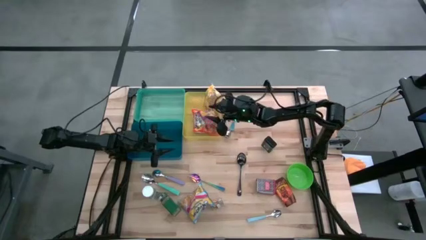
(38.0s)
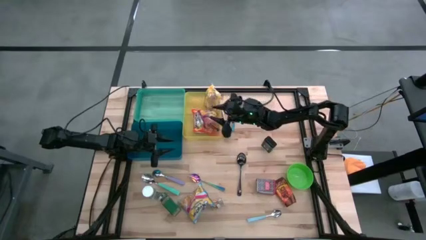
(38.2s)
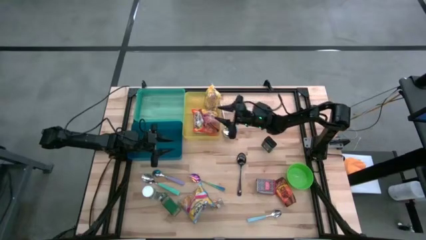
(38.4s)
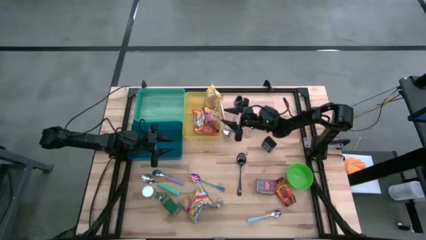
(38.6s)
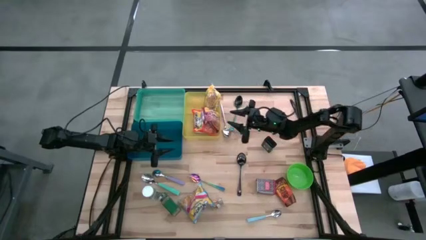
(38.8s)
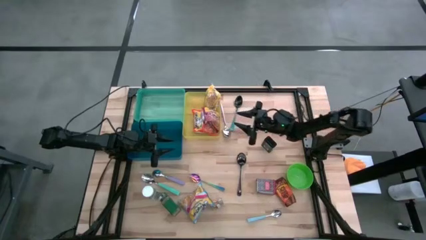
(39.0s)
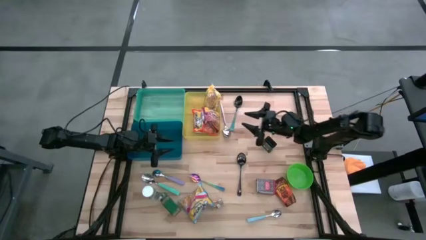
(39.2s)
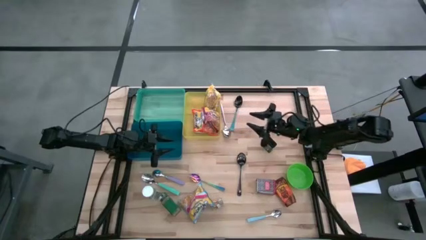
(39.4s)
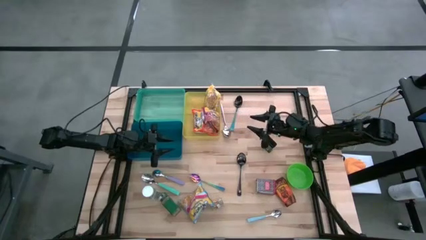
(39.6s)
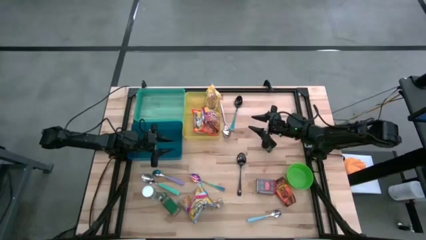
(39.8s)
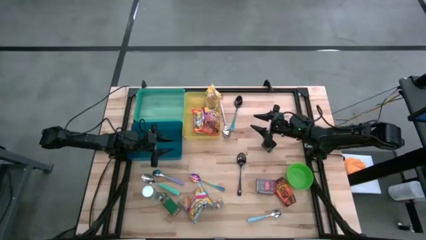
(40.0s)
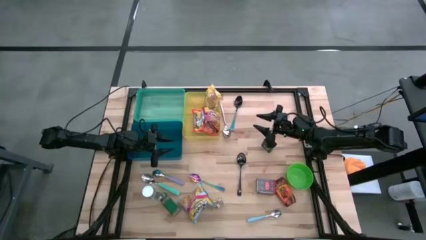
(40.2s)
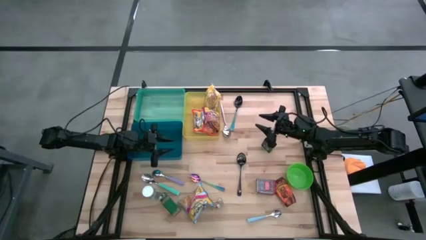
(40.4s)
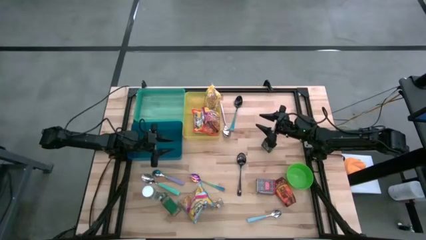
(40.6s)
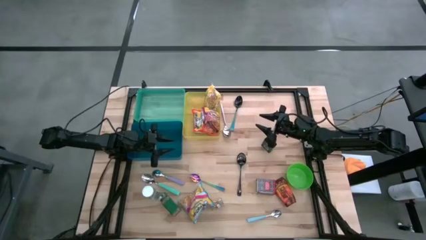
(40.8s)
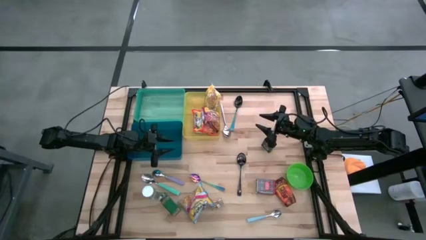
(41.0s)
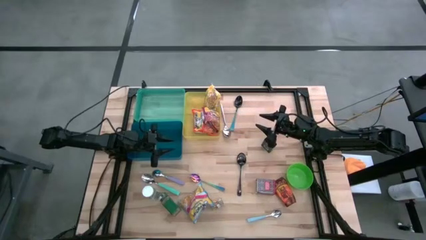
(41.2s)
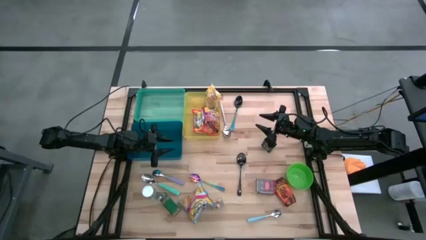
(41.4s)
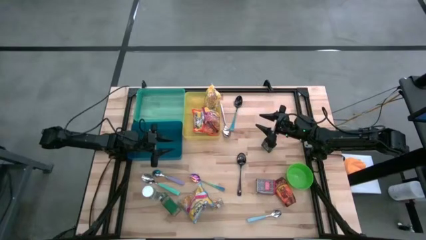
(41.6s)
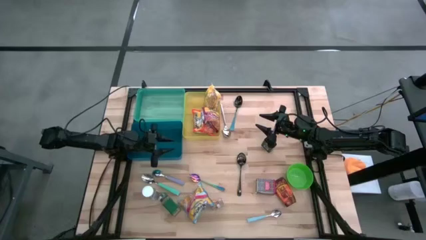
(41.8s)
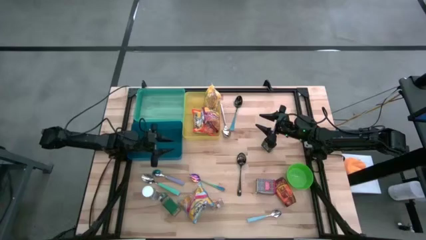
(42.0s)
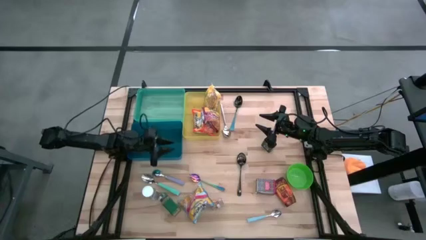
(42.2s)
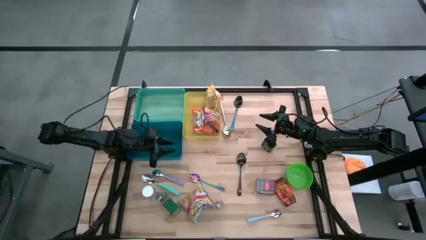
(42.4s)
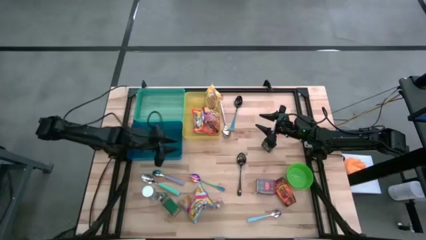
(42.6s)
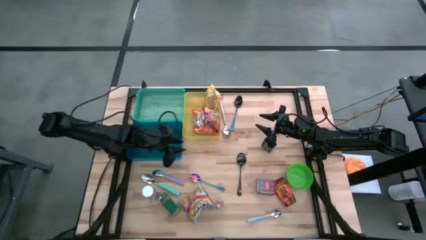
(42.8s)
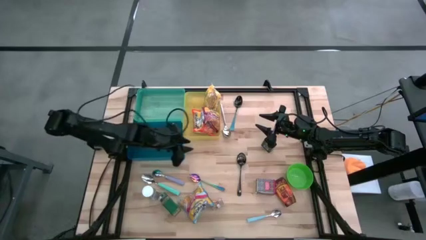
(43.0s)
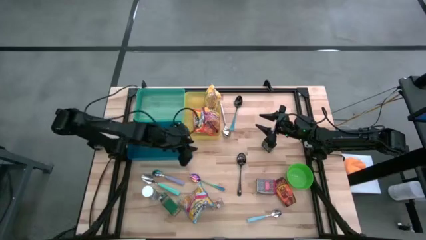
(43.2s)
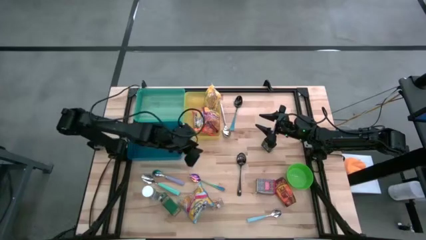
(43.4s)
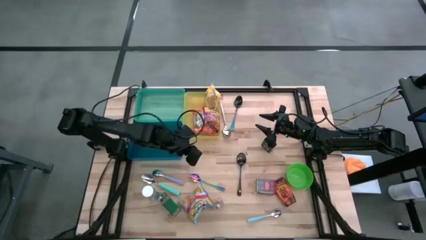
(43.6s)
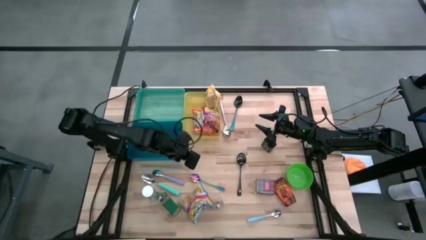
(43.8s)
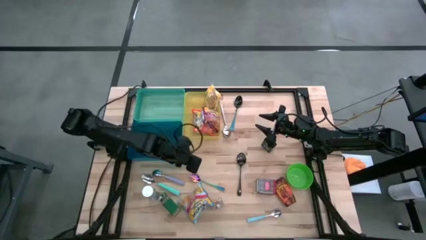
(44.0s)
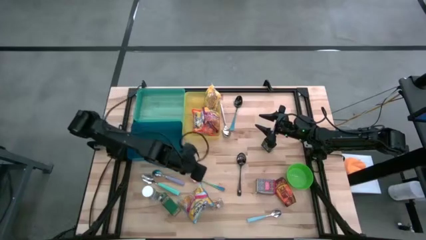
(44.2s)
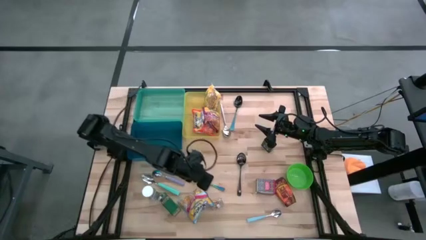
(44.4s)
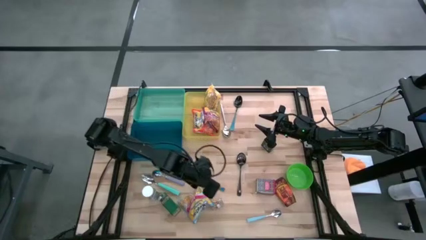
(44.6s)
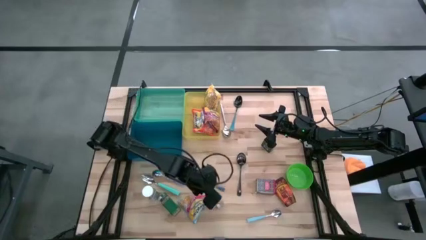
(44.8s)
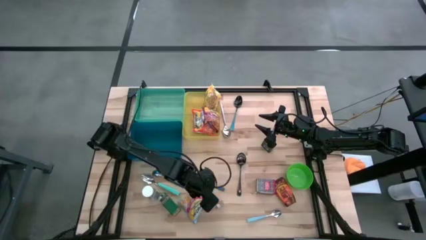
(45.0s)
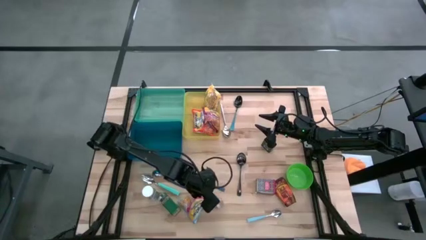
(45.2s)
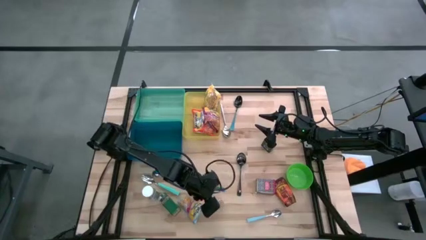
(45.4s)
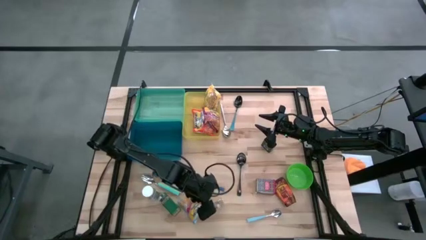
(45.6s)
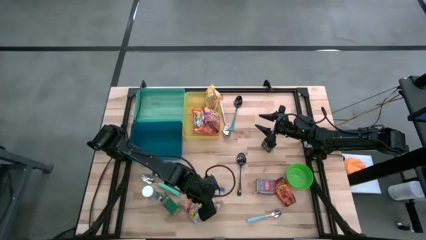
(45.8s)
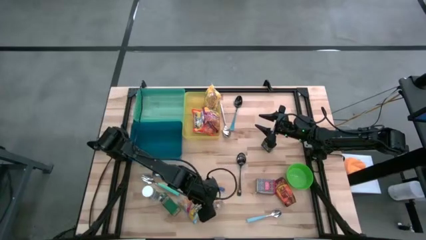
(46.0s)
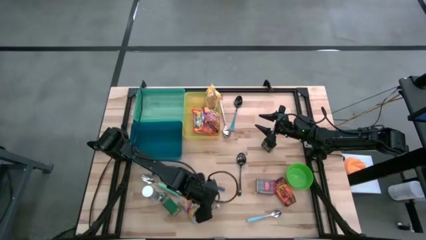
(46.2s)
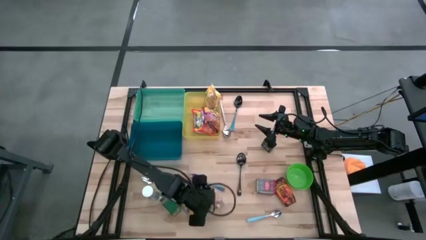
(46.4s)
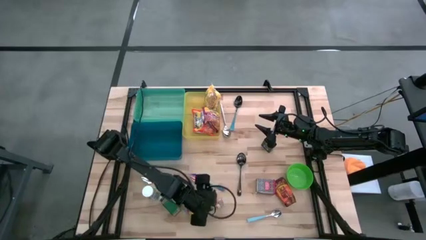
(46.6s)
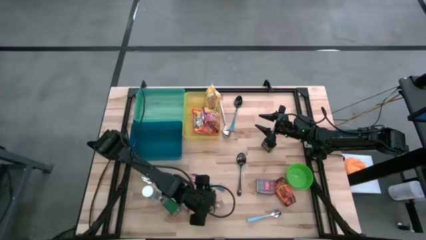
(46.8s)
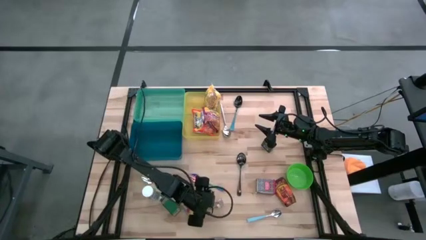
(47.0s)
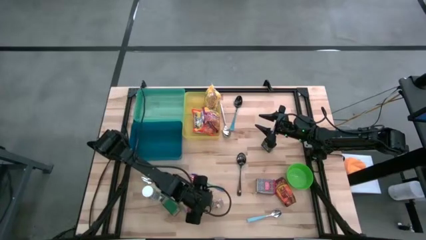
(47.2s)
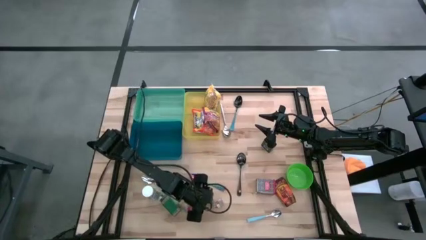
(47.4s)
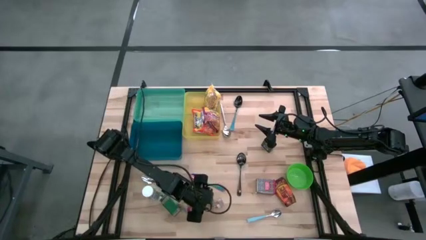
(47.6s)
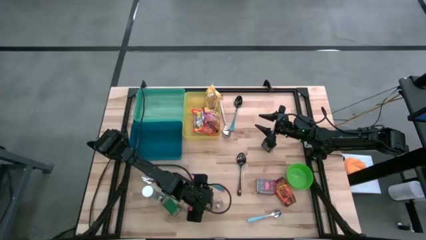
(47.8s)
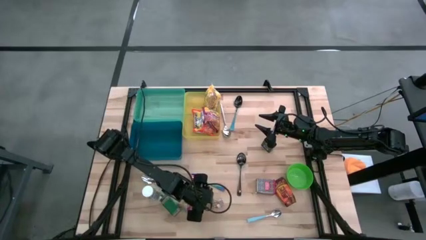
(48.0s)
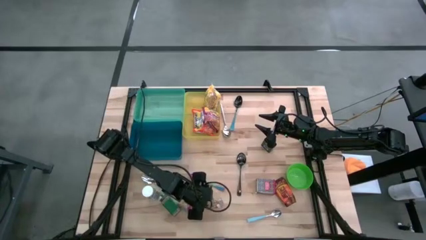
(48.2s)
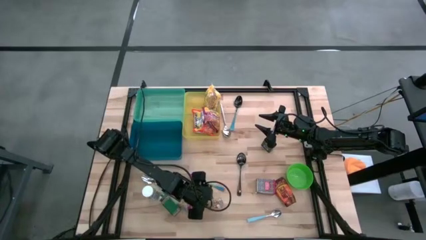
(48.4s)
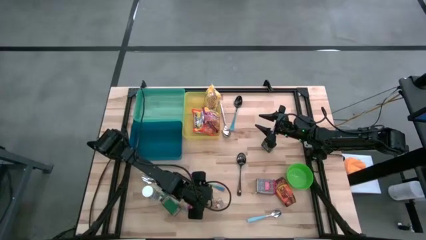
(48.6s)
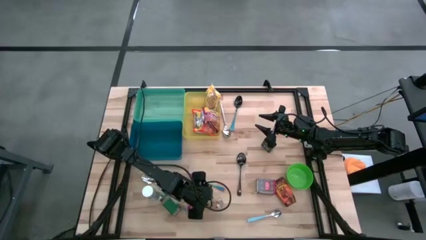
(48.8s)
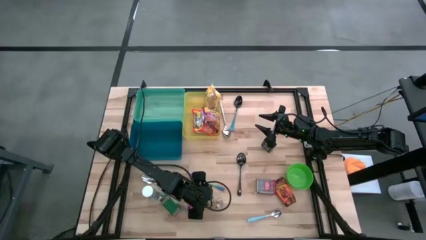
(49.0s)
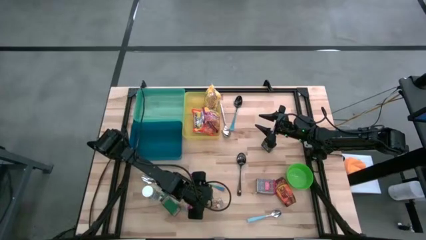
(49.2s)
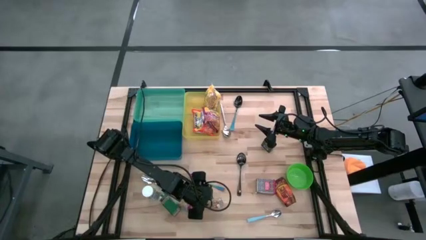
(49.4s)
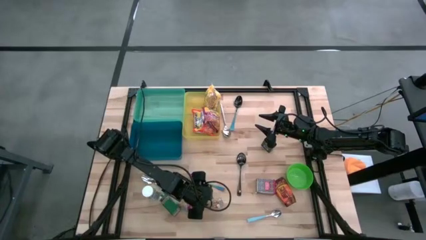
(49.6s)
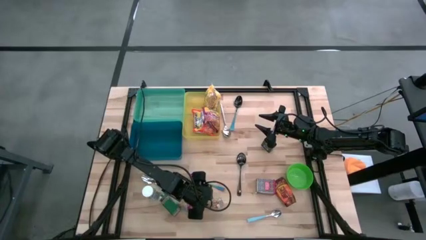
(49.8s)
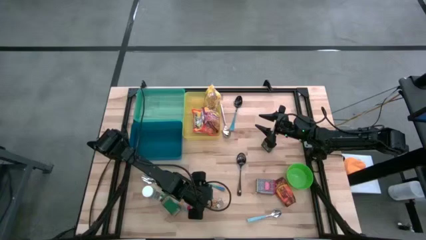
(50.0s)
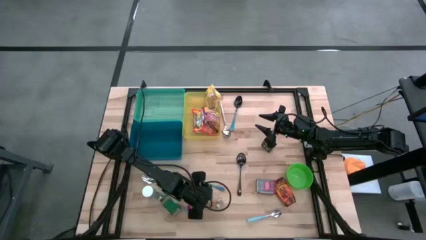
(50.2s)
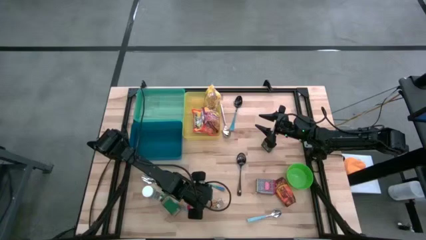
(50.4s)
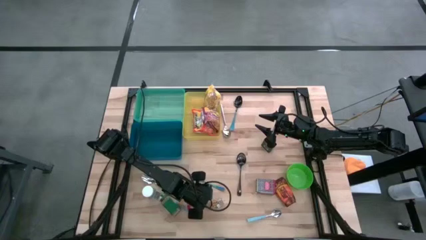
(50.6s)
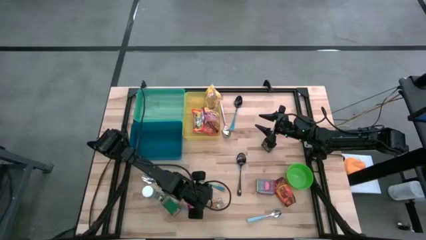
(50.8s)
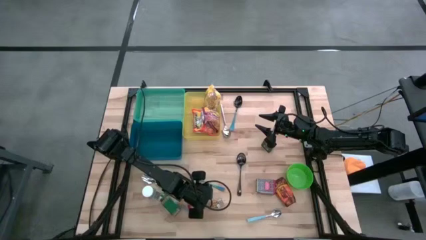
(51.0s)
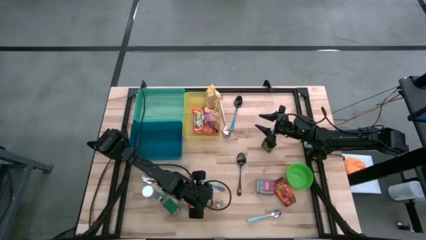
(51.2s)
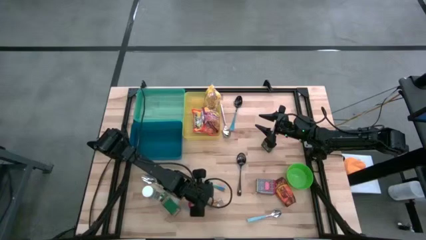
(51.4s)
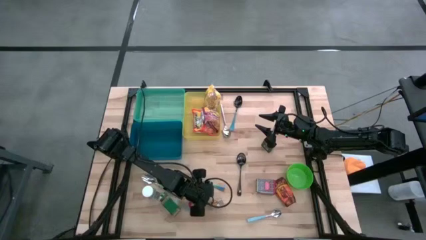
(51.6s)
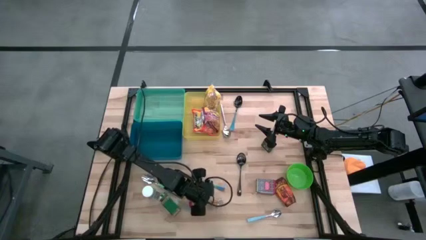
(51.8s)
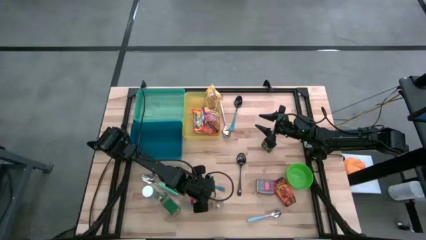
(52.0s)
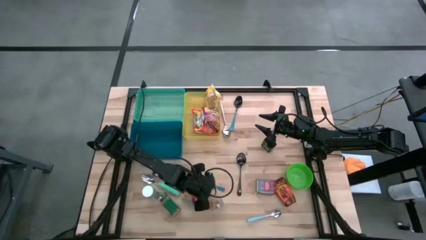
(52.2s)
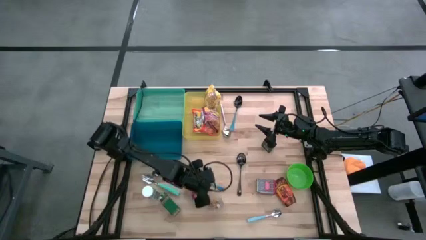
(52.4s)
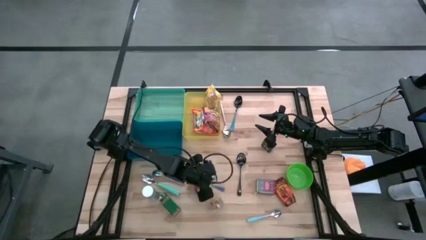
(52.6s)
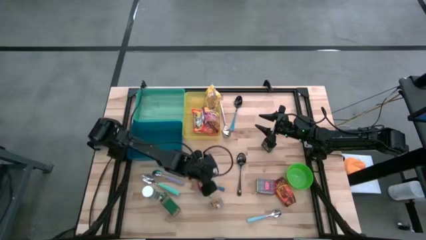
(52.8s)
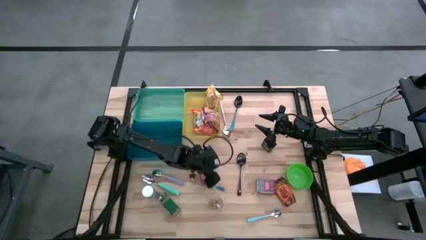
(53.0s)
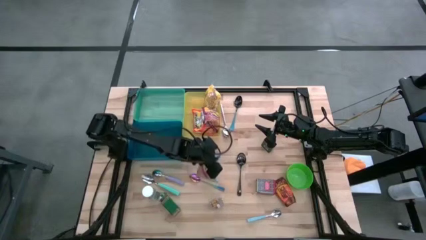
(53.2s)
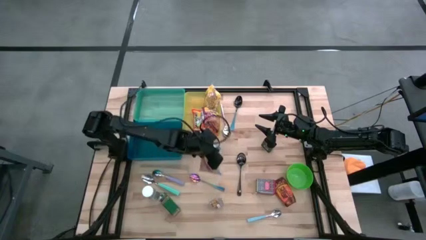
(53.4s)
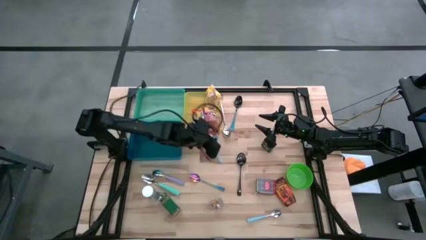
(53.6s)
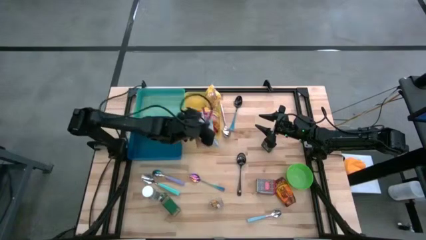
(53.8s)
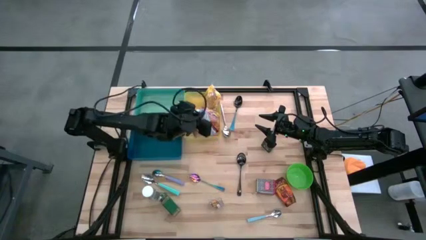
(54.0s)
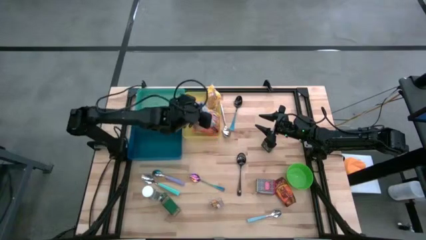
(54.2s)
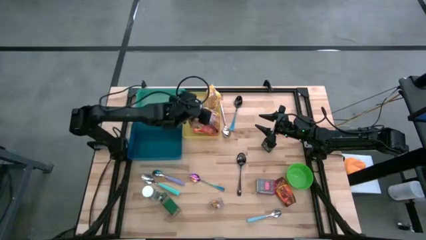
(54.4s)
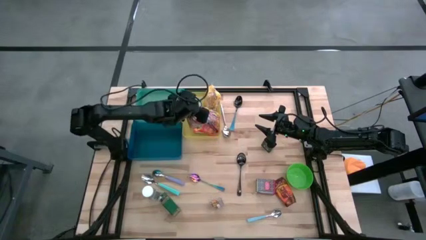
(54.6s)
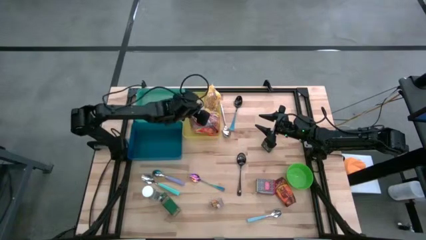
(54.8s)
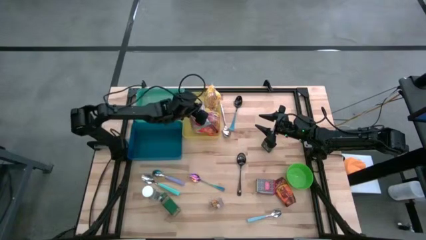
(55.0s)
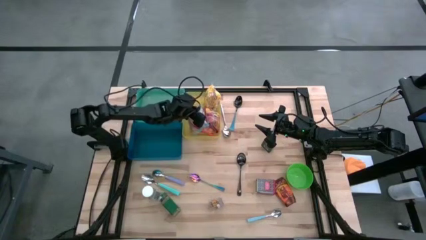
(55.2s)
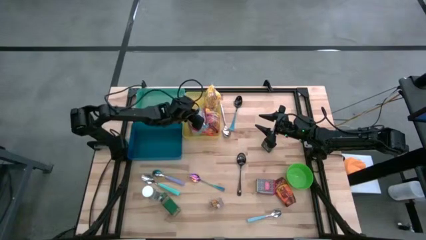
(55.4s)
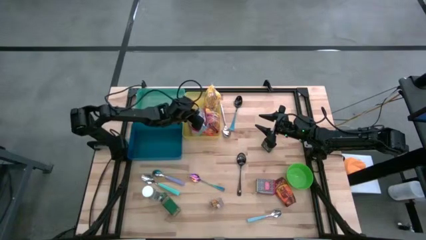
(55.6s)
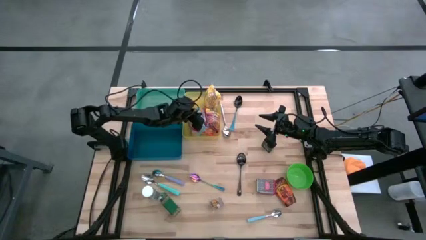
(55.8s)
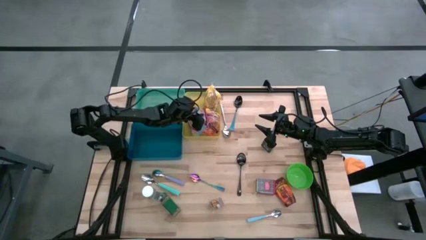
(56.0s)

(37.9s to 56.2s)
Put the blue noodle pack into the yellow bin
